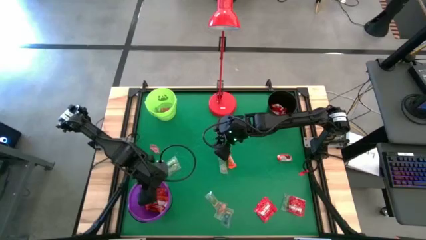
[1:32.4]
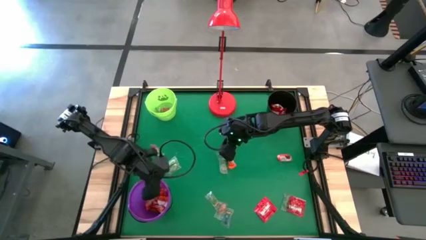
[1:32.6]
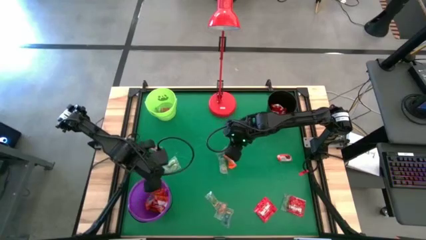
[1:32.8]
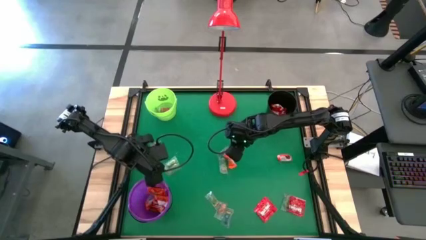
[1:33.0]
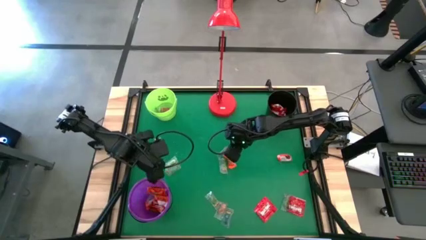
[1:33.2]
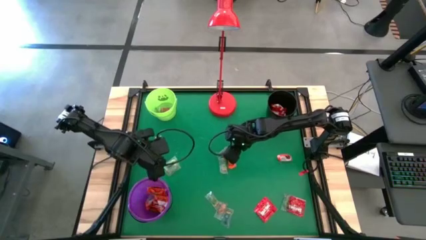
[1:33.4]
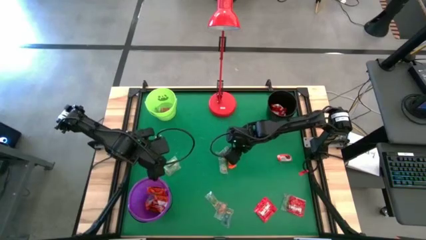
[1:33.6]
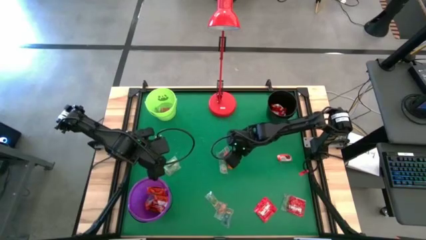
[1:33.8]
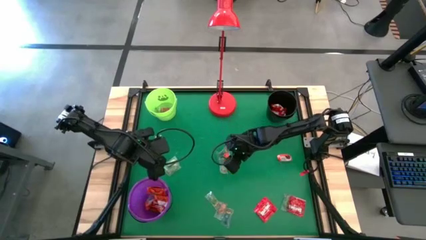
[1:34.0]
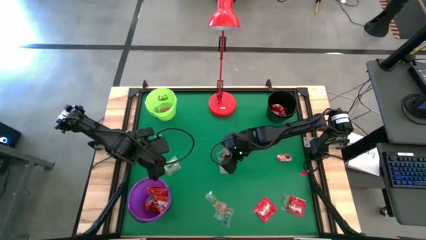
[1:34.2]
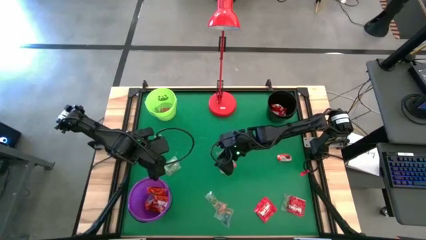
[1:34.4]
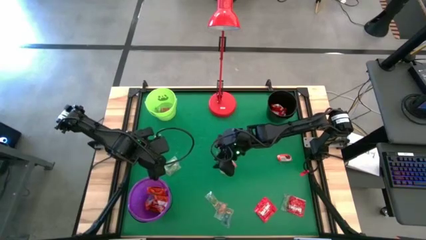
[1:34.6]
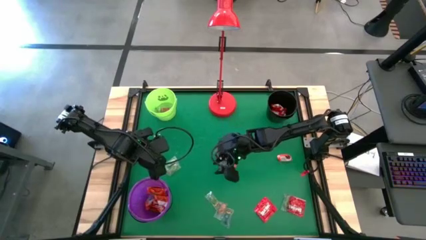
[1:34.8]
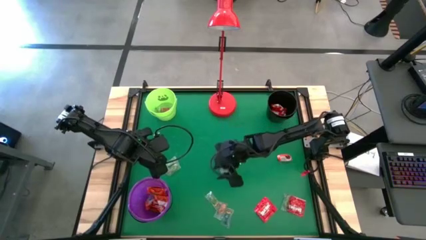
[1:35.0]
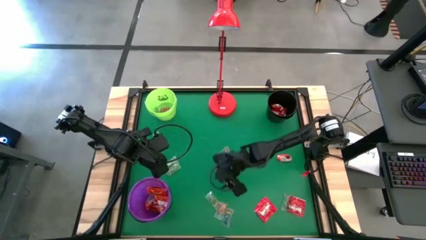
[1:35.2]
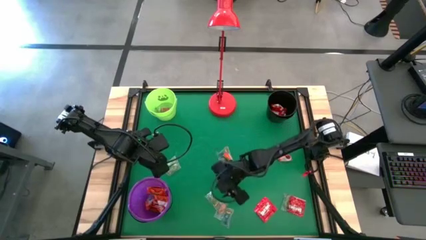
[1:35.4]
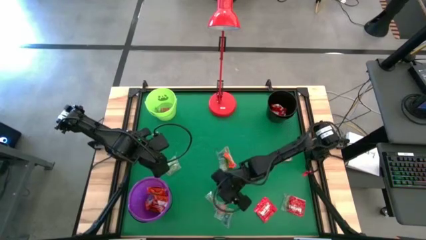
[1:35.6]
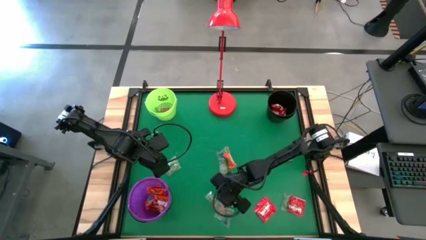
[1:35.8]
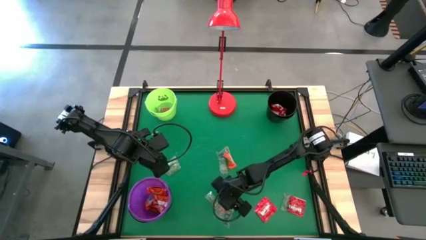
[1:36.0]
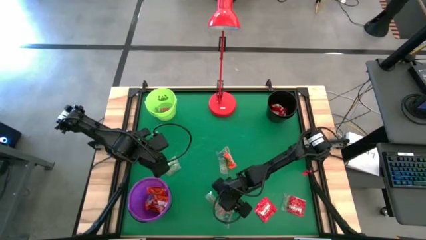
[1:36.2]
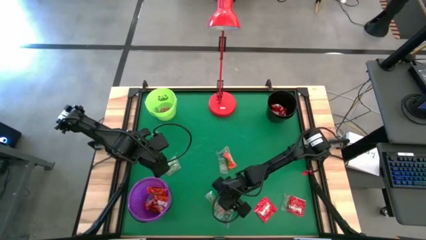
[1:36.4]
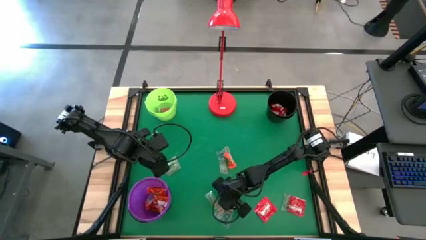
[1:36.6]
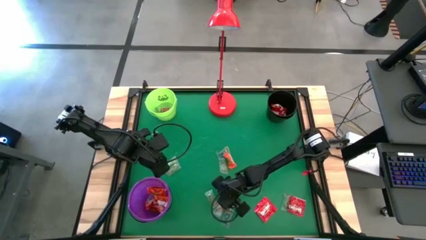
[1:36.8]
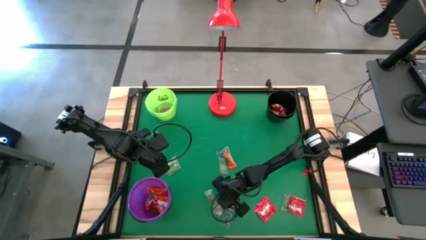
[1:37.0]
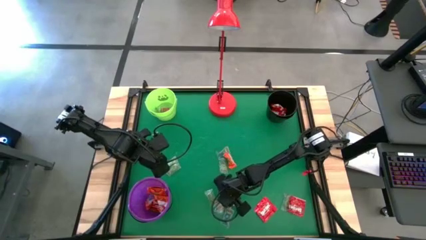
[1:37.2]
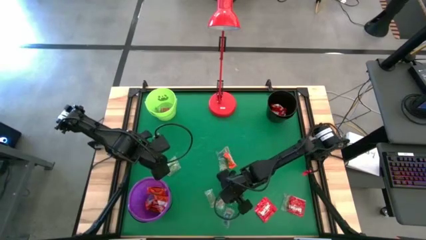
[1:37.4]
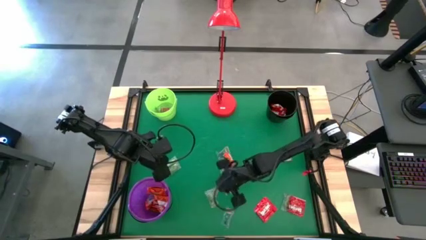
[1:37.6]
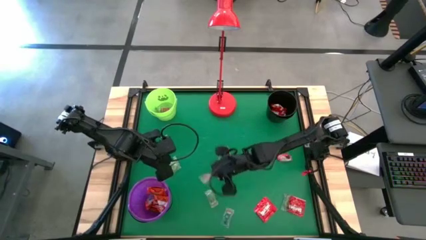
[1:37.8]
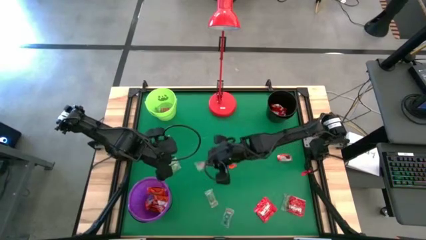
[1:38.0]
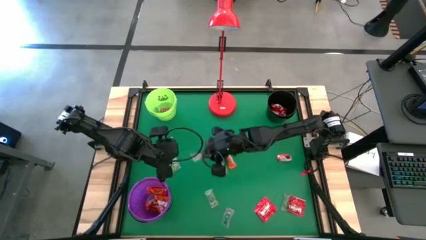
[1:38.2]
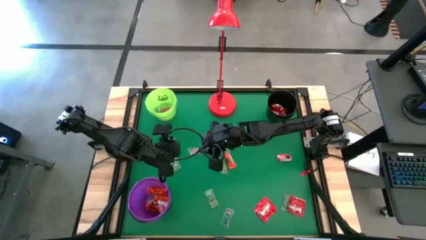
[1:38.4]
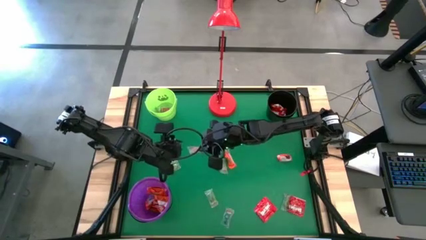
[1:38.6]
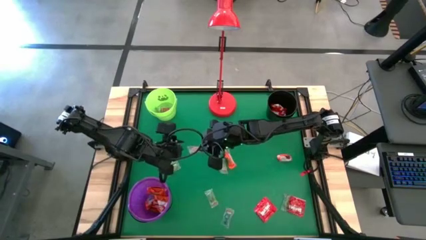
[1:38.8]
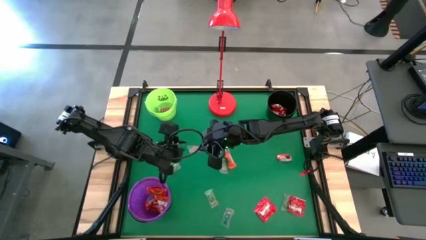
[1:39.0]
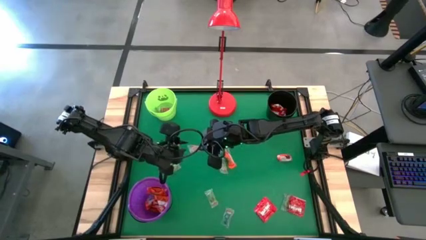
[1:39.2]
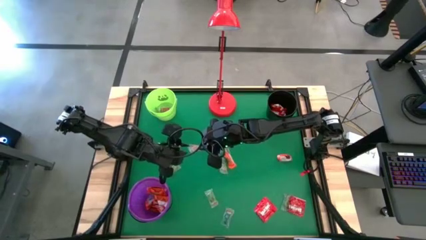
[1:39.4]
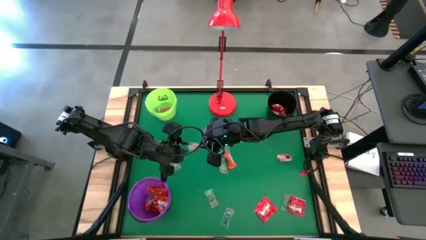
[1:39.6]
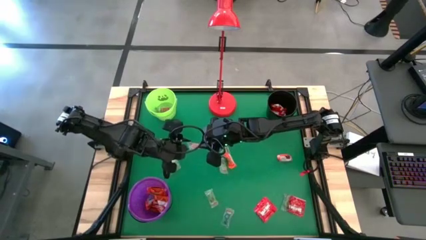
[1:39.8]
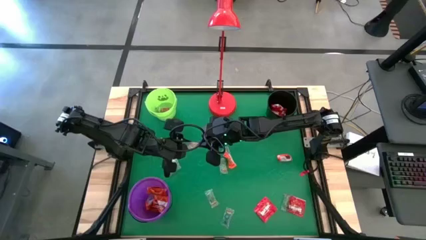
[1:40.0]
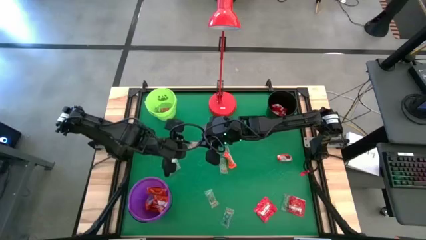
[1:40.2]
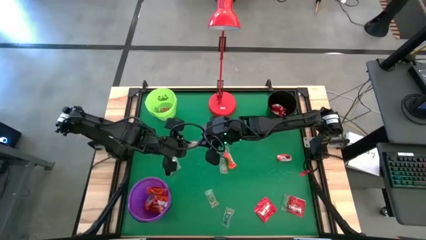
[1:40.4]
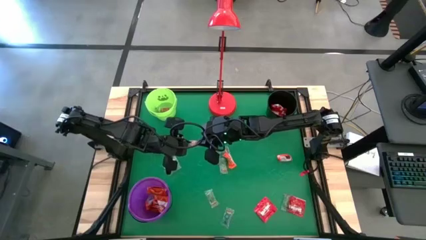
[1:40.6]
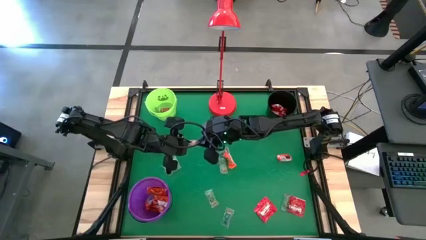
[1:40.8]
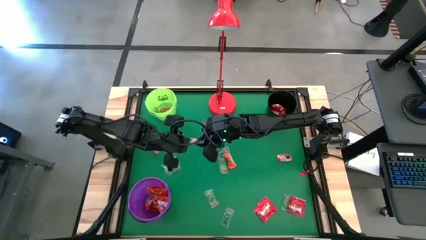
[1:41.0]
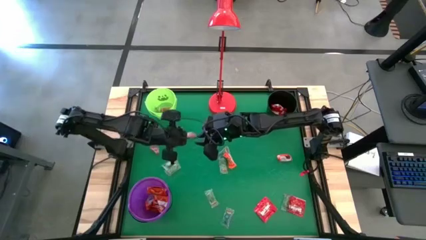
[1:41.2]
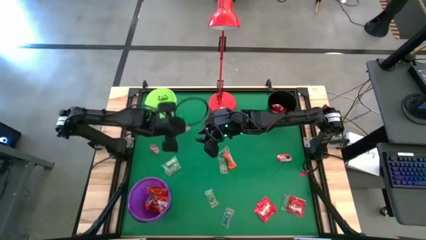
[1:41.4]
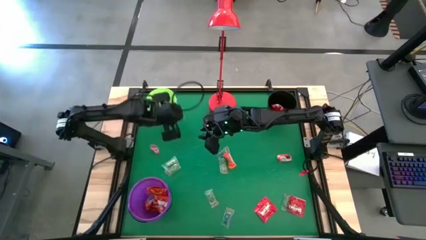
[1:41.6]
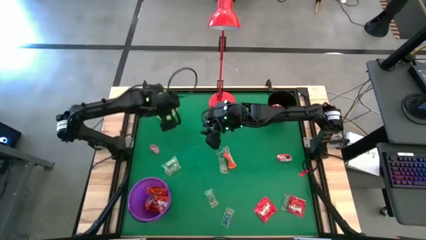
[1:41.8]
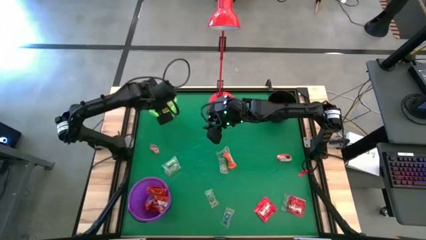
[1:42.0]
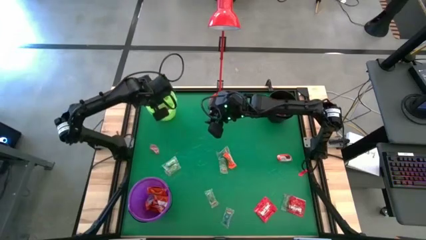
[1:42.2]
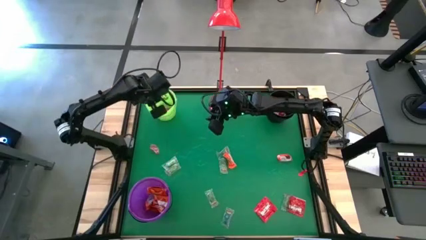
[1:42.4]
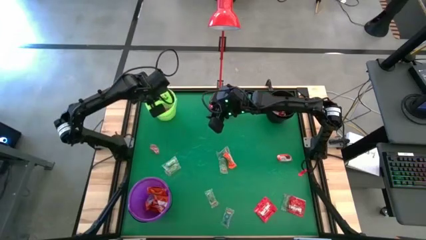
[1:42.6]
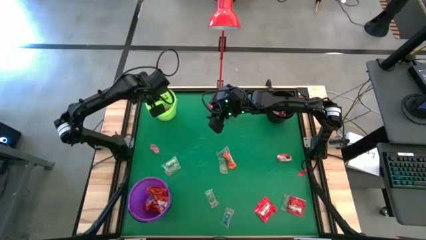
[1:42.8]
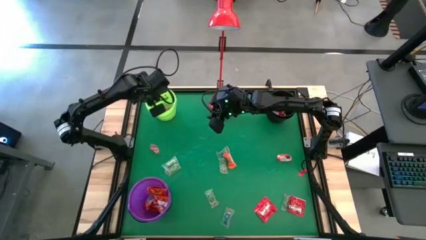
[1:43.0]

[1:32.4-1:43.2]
Task: Sort candy
Put the transparent candy into the green bucket

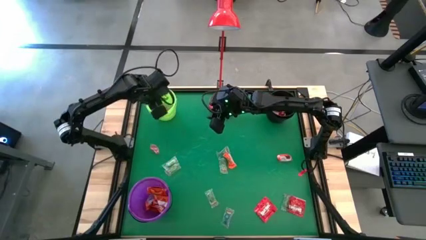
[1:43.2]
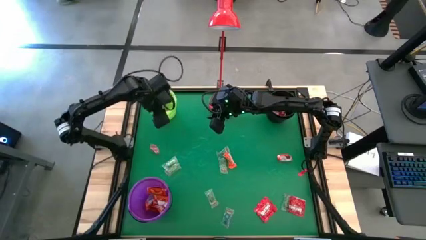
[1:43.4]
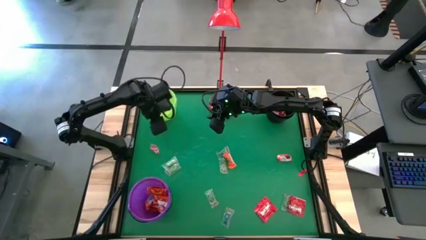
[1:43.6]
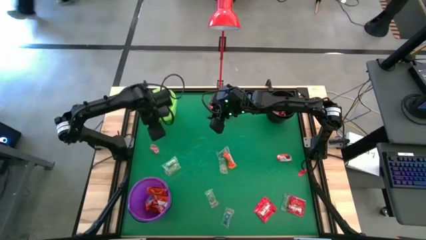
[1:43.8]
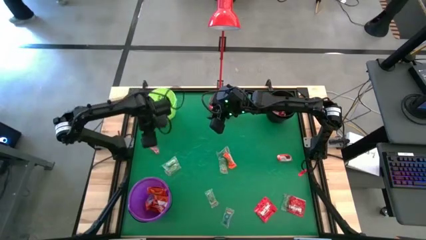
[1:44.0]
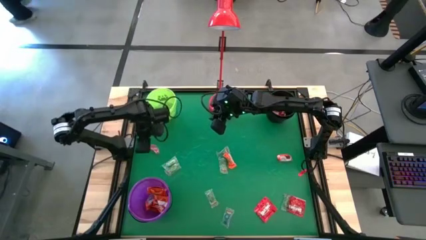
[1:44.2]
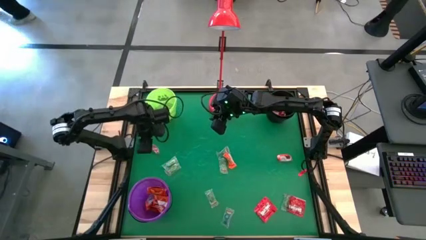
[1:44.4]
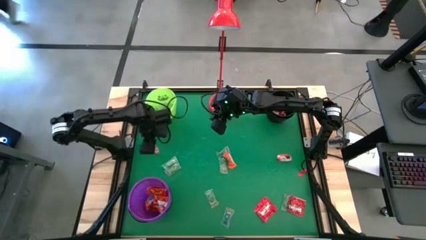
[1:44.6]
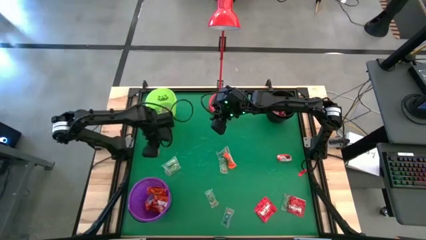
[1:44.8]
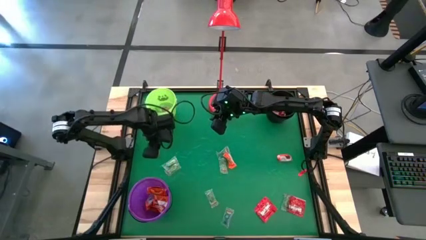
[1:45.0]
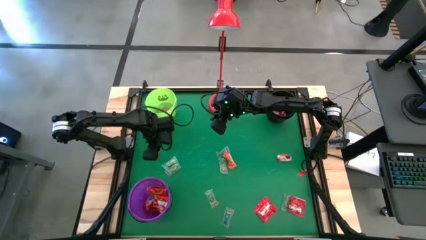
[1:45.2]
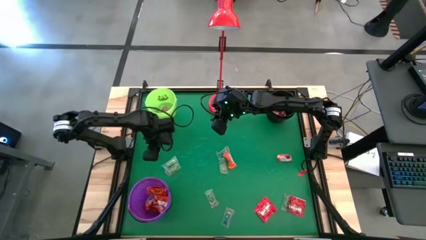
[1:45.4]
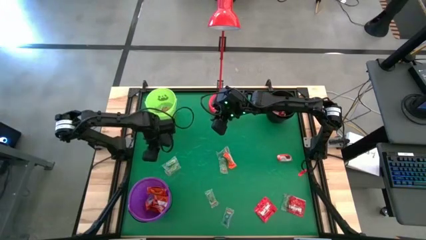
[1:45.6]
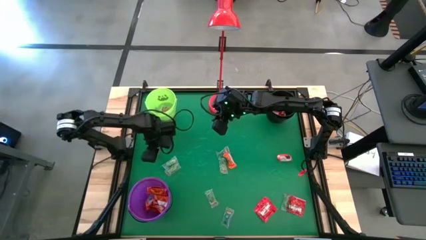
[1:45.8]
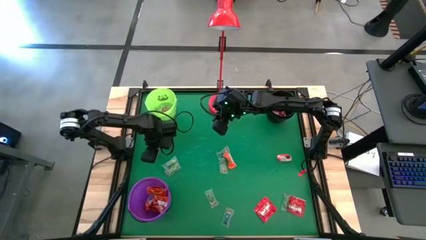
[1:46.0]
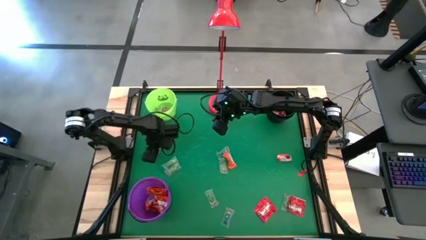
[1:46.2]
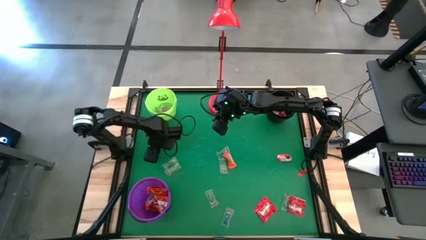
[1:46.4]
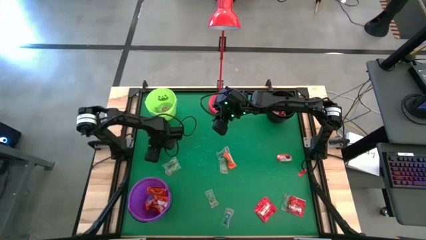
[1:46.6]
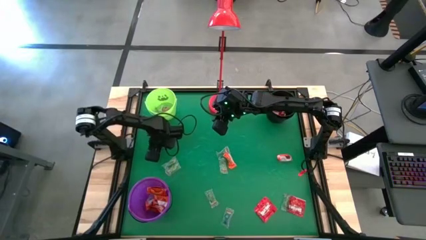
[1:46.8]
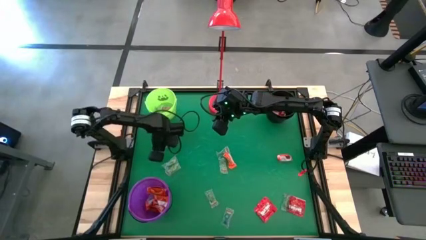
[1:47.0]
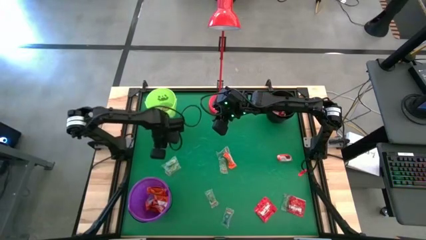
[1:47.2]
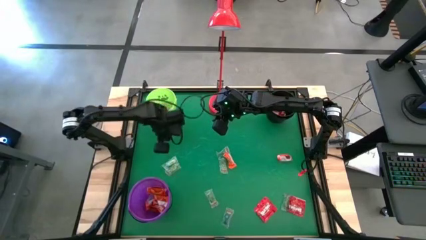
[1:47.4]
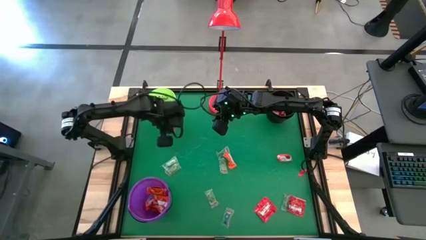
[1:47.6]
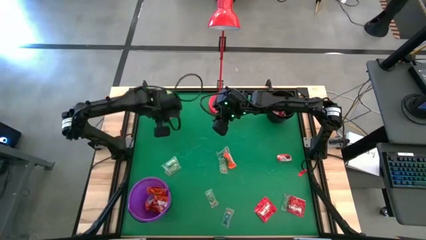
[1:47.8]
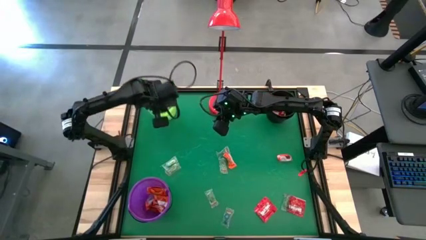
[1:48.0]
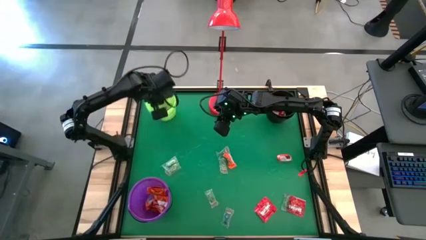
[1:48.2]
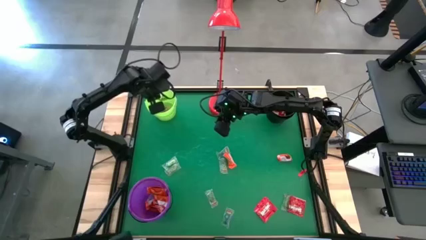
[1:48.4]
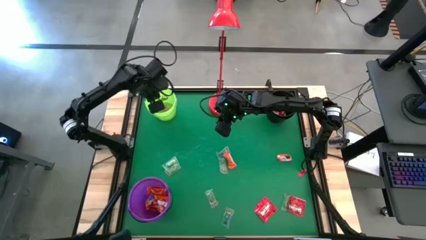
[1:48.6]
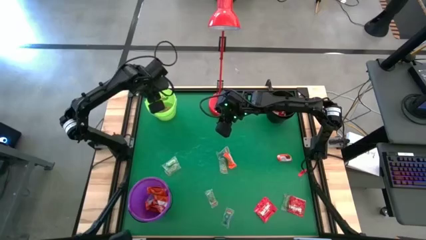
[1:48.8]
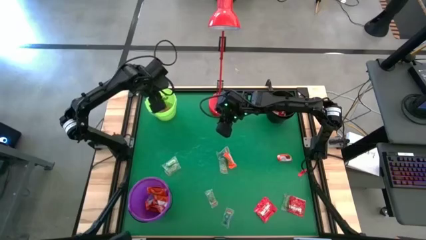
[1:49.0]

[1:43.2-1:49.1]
Put the transparent candy into the green bucket
